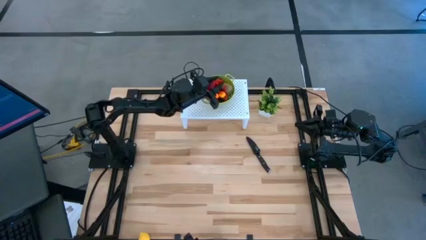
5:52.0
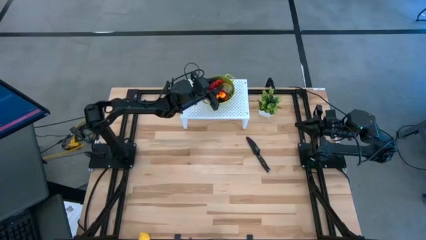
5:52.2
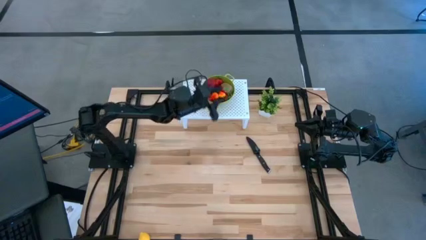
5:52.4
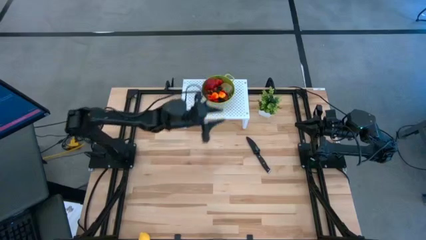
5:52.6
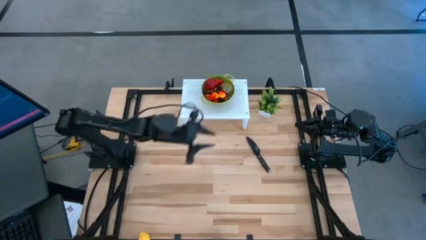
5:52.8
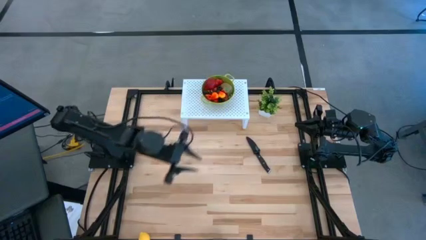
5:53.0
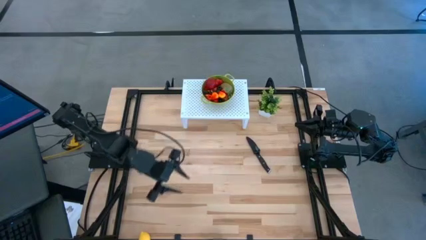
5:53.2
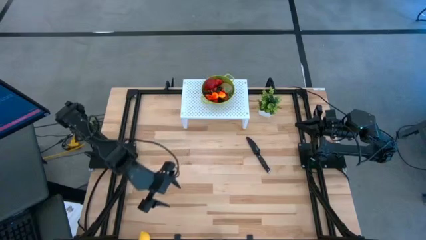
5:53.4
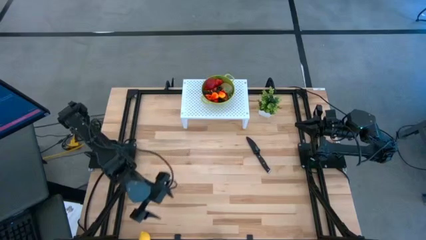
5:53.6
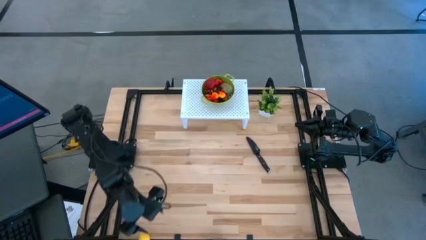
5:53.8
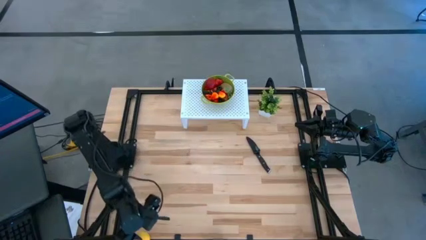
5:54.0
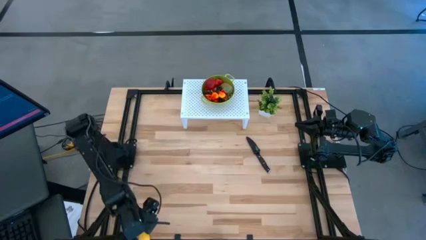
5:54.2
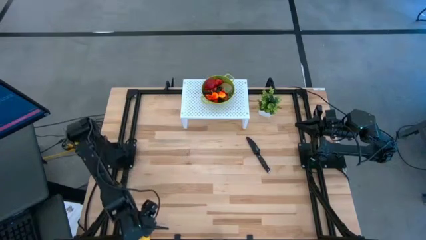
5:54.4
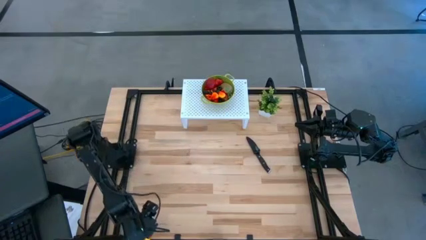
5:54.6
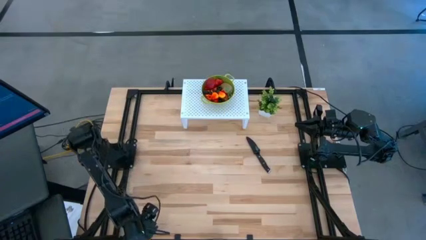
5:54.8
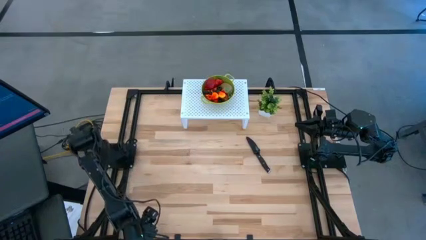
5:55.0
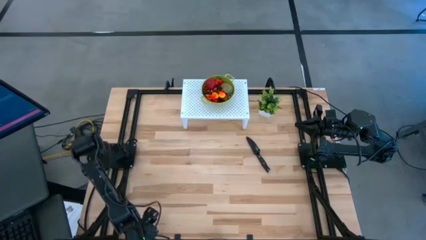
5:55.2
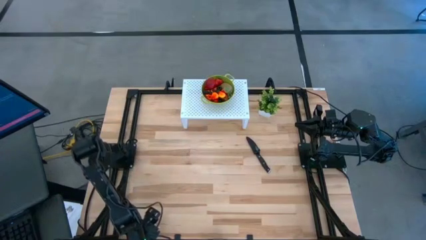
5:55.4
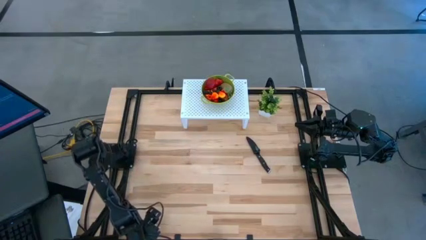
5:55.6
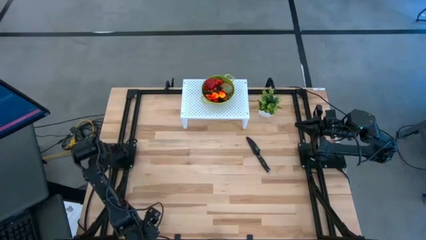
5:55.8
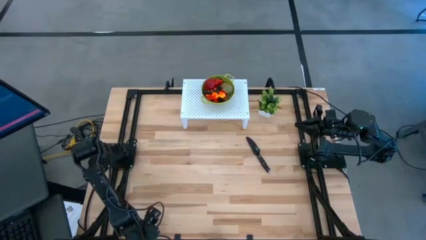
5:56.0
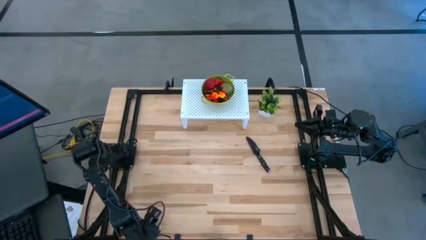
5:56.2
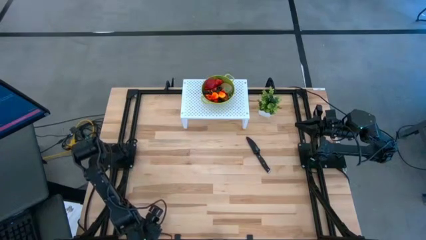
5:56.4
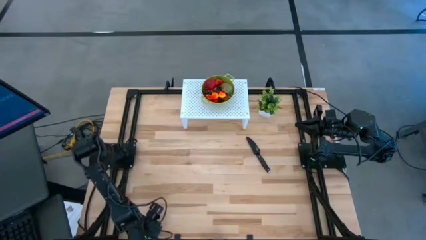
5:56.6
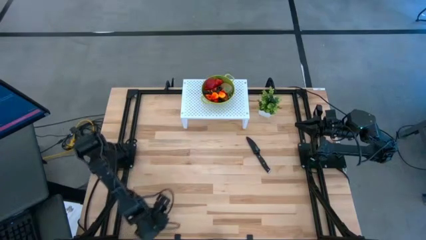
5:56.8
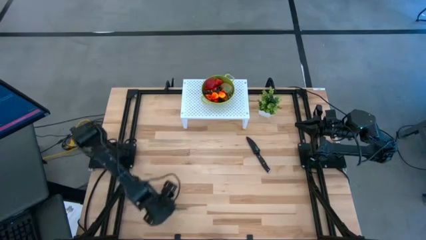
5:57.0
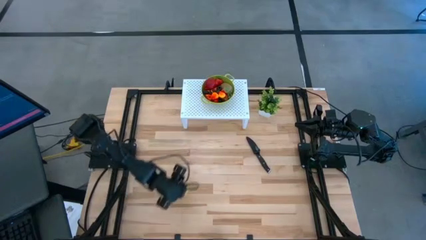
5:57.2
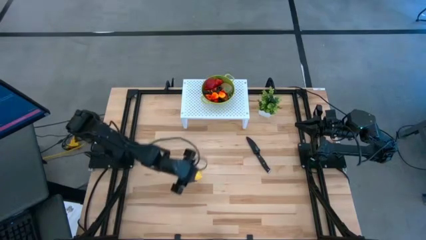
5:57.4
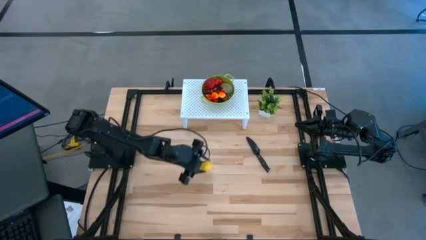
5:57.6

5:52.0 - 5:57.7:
Task: Pick & Place Fruit
Put the yellow lemon into the green strainer bowl

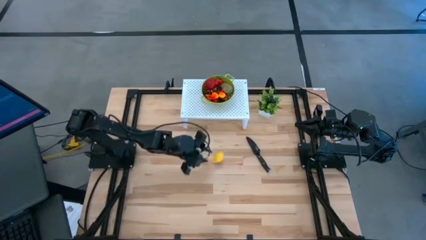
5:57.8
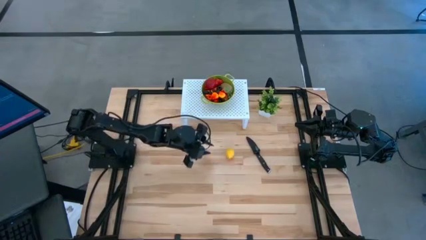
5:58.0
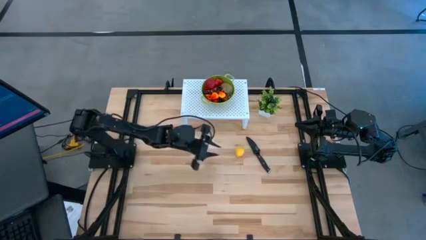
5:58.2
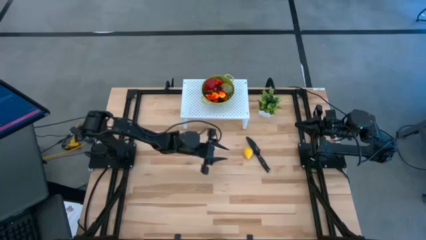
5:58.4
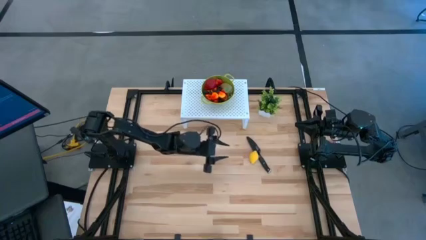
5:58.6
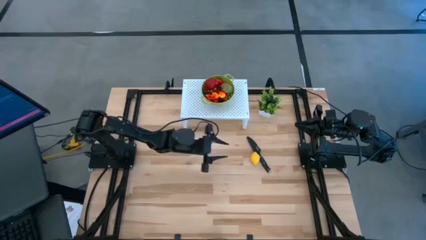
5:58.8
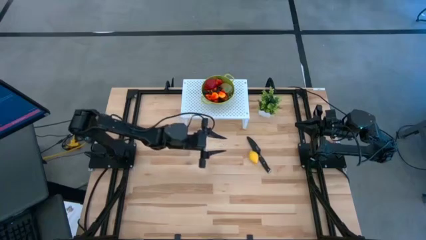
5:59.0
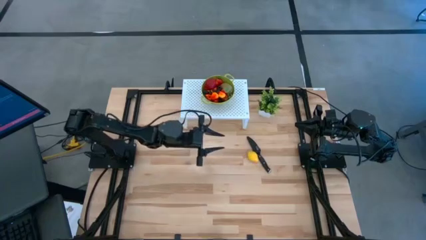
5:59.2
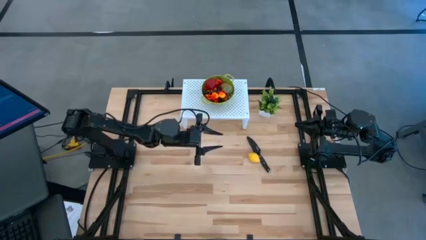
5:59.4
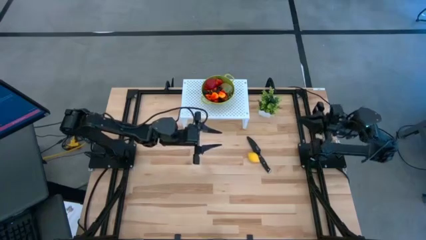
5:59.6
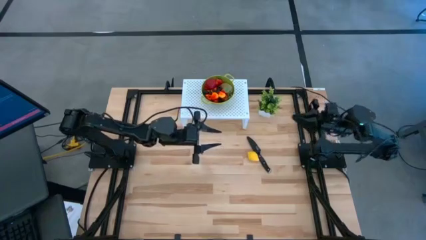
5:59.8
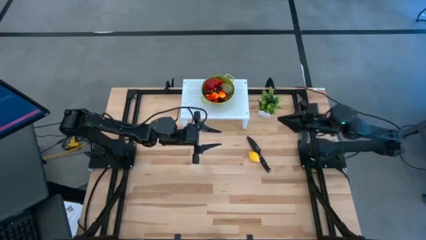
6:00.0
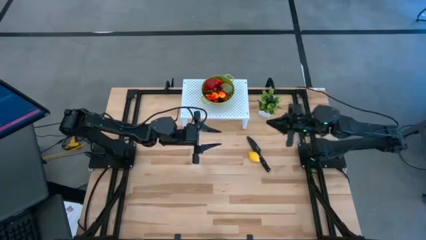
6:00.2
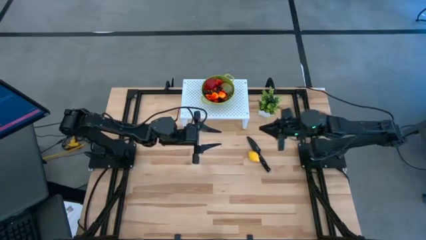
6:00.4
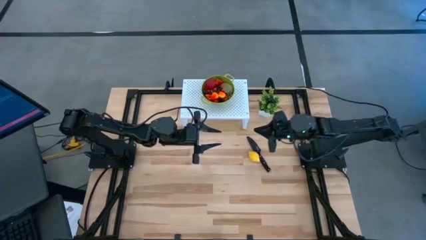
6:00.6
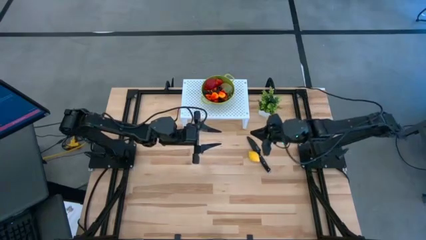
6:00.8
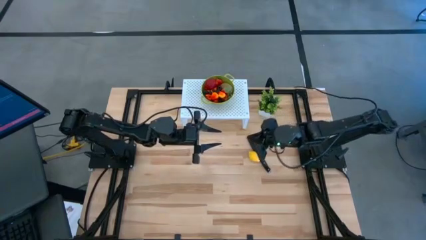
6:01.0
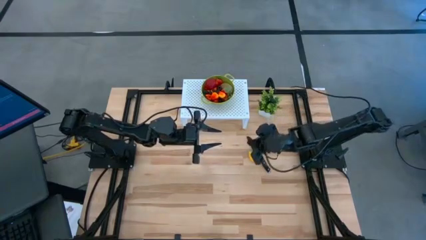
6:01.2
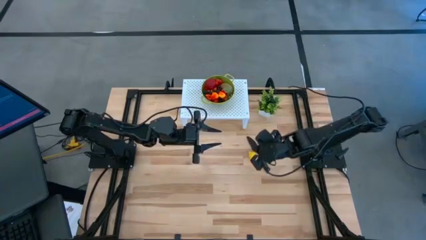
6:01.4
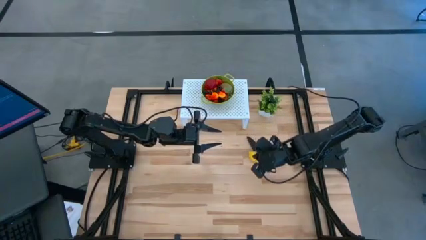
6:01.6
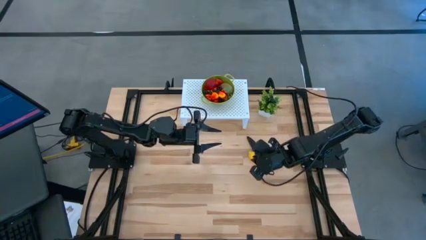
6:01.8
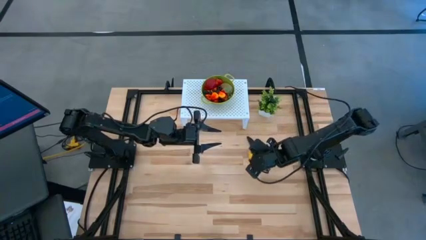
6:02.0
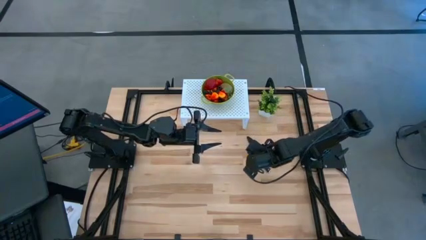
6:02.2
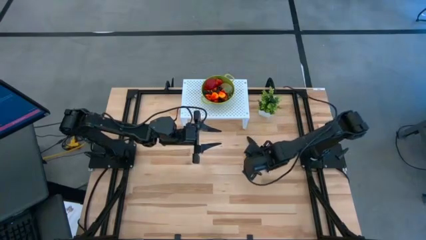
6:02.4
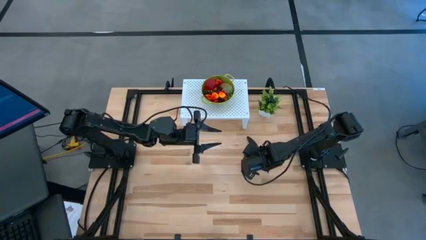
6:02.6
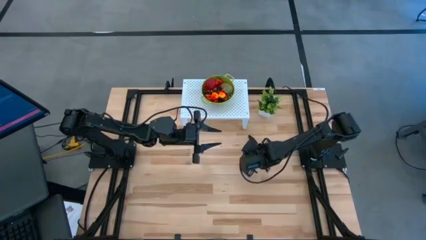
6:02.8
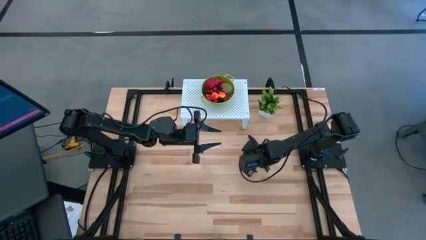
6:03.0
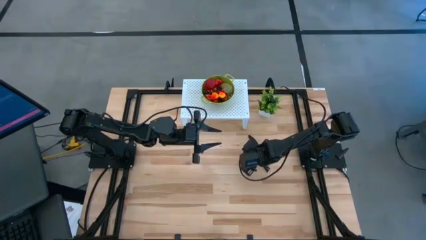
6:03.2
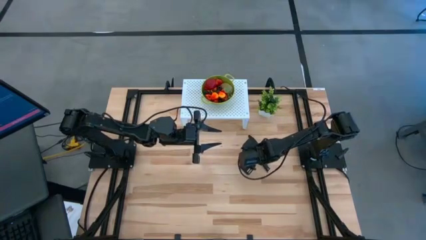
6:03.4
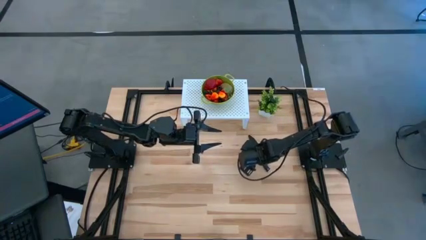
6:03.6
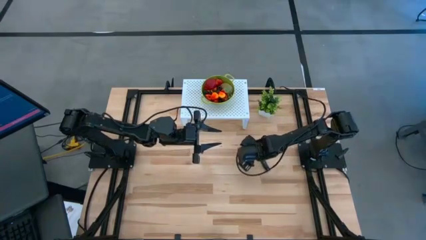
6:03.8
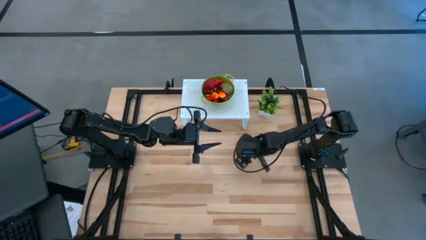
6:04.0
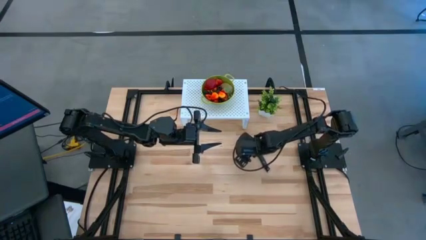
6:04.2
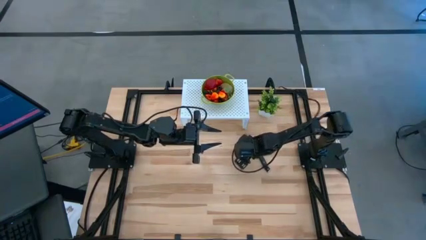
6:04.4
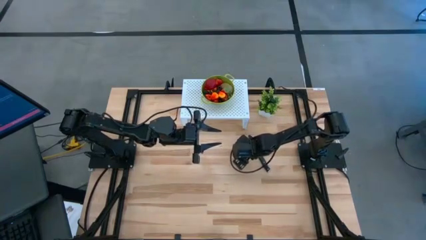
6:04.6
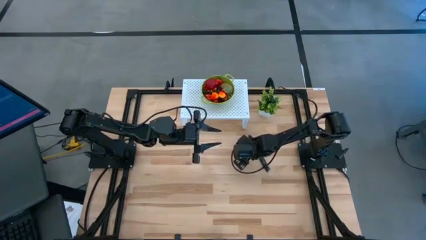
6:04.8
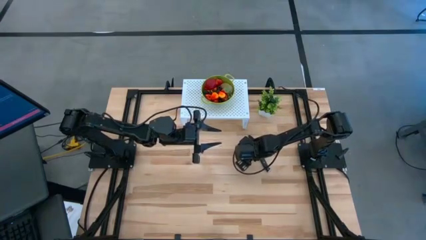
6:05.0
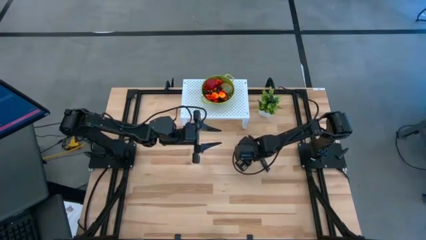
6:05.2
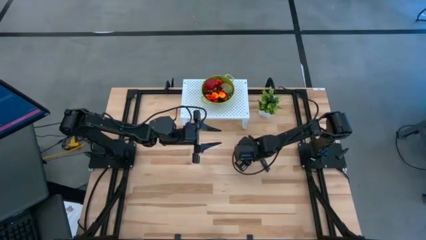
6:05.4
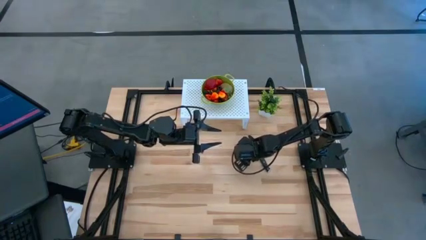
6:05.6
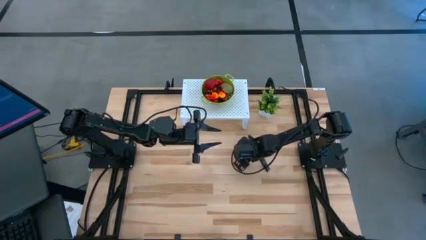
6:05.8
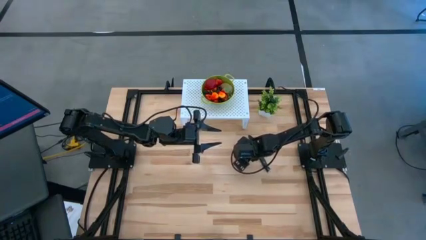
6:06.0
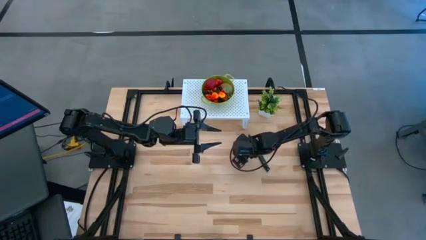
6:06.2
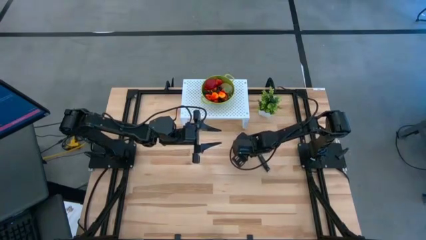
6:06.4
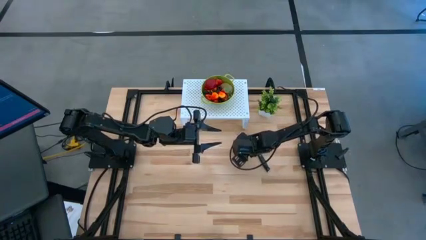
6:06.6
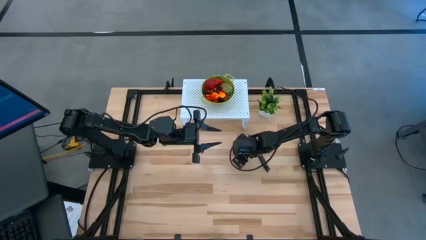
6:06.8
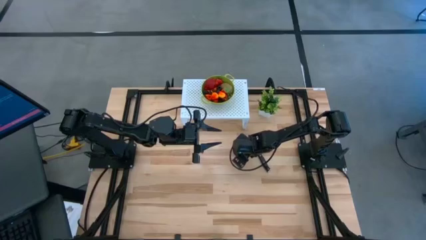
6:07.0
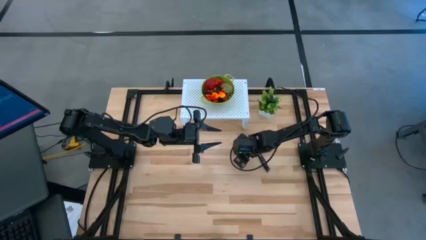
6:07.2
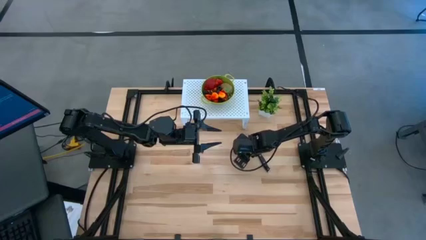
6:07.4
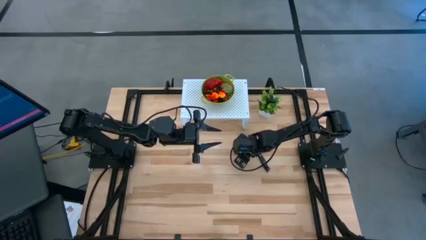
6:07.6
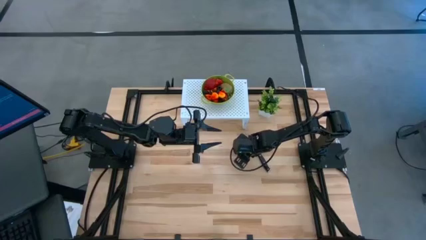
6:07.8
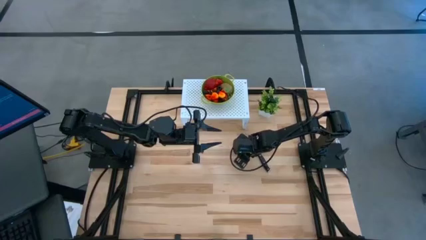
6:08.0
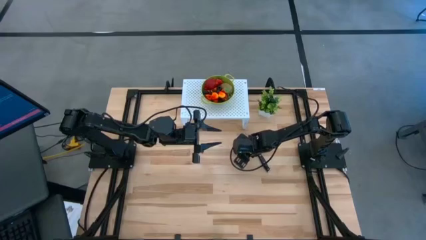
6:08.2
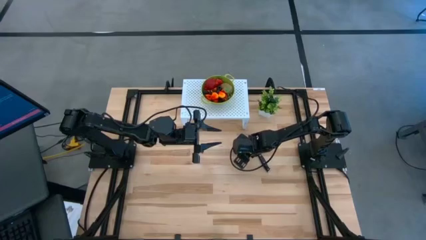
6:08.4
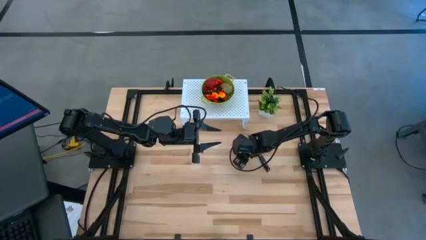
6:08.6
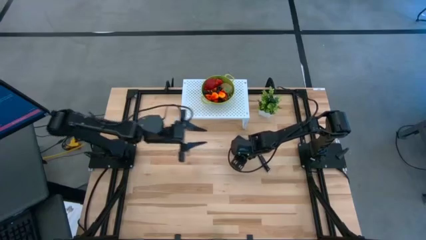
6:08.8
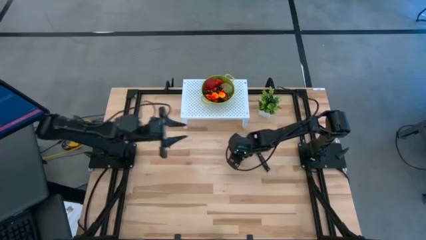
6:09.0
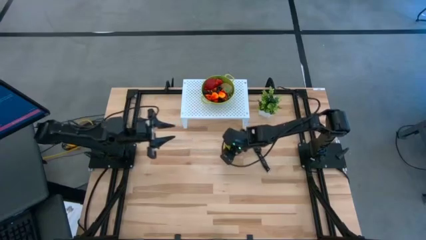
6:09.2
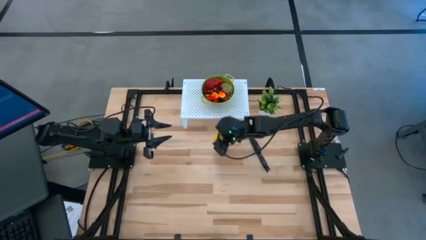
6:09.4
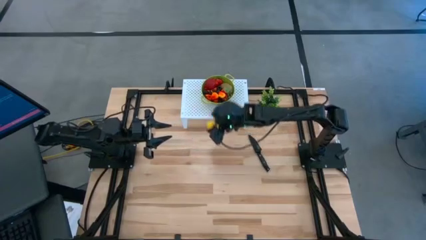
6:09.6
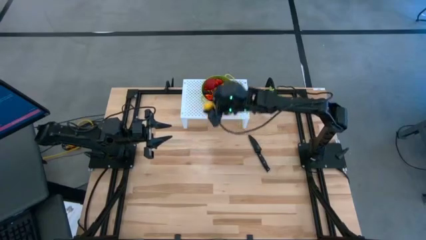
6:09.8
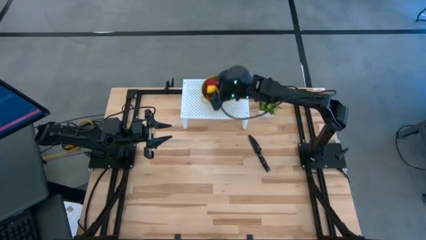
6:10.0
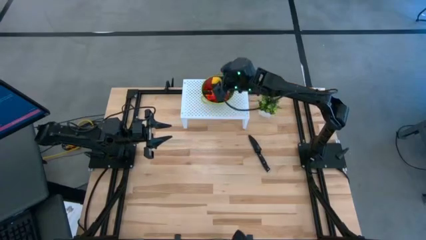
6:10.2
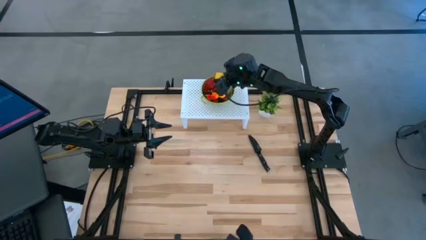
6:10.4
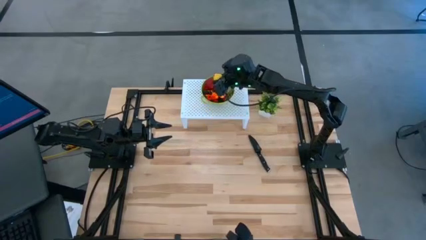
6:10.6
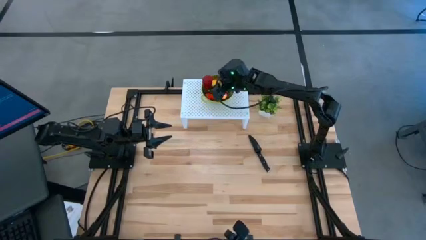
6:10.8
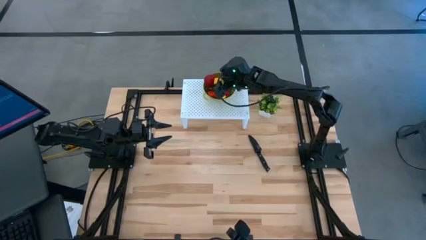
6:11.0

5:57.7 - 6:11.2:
Put the yellow lemon into the green strainer bowl
